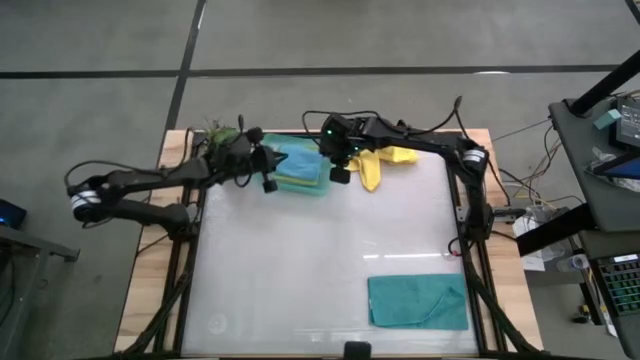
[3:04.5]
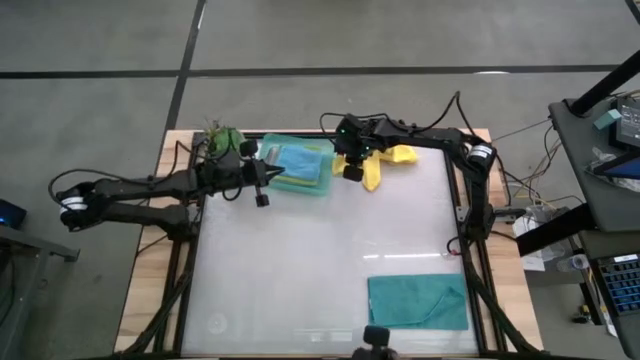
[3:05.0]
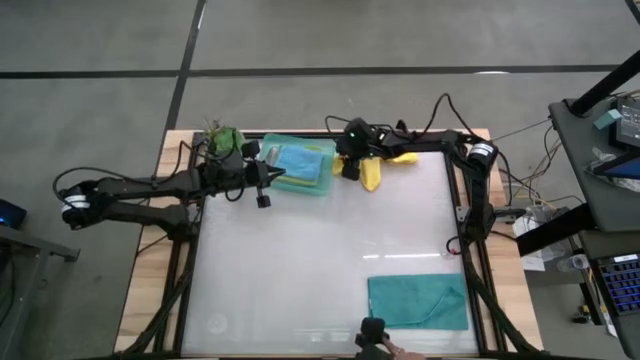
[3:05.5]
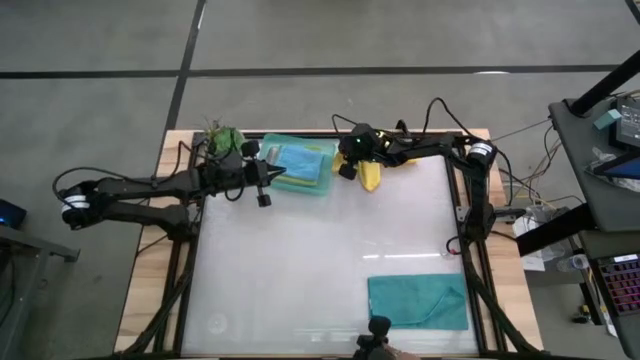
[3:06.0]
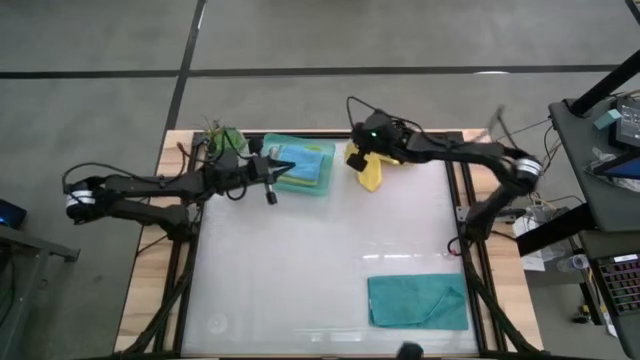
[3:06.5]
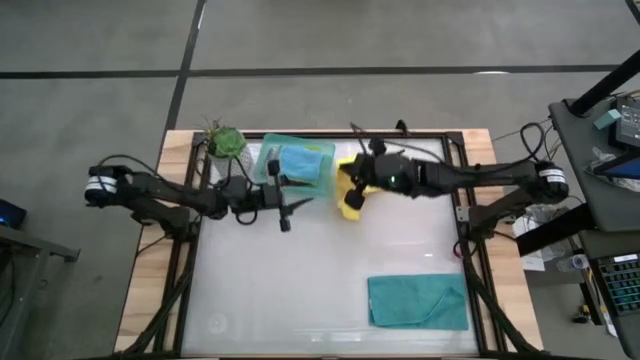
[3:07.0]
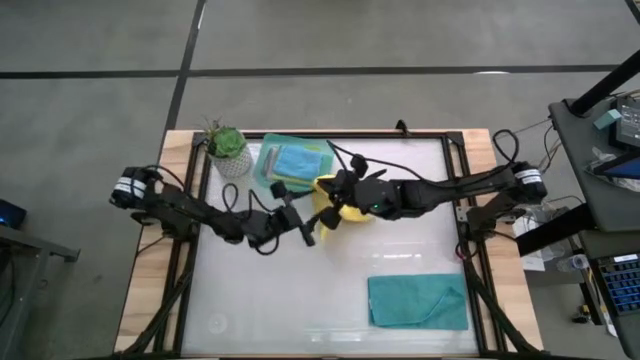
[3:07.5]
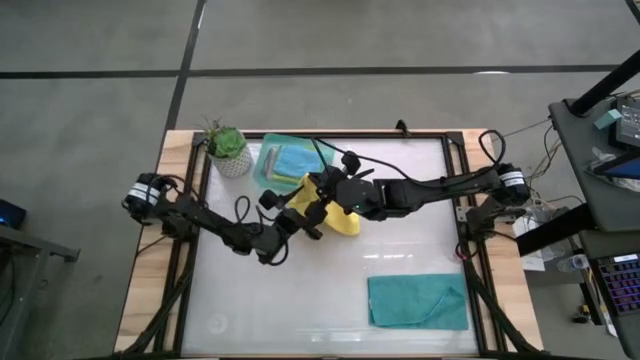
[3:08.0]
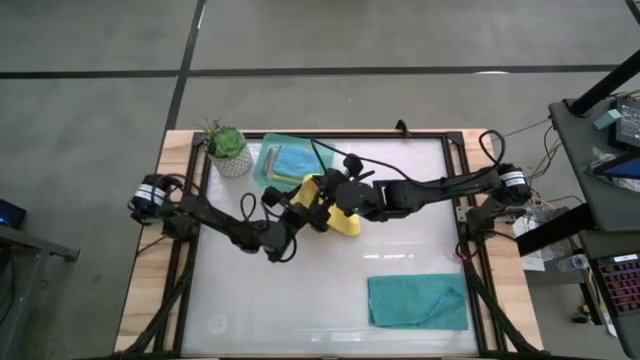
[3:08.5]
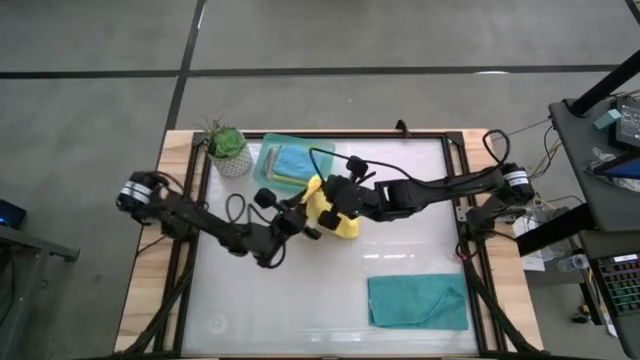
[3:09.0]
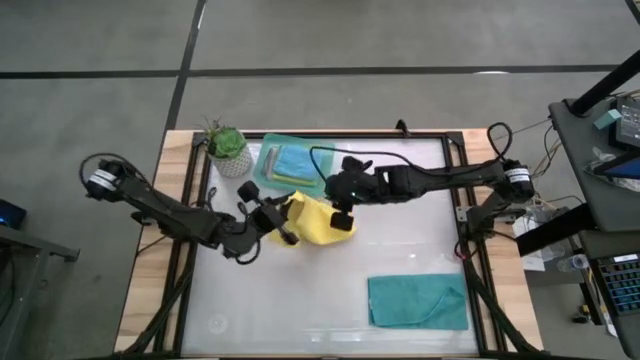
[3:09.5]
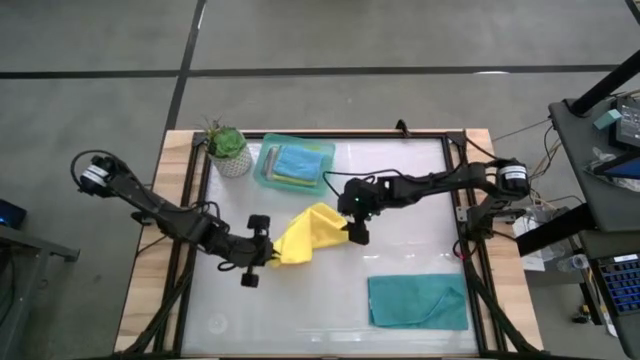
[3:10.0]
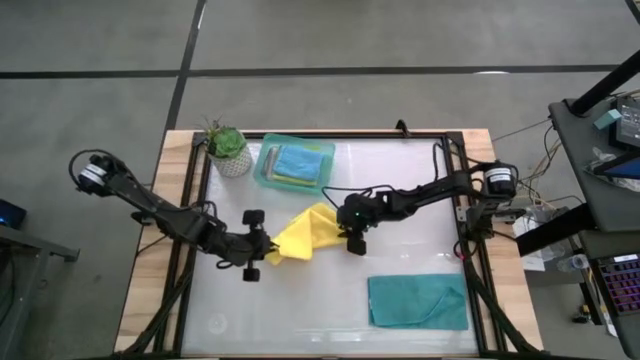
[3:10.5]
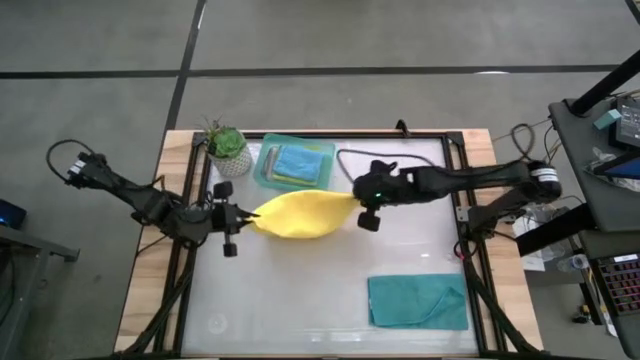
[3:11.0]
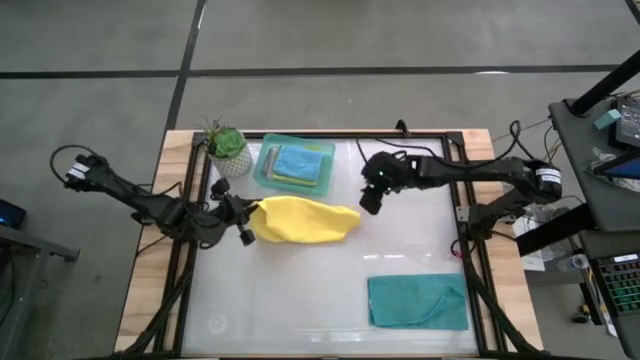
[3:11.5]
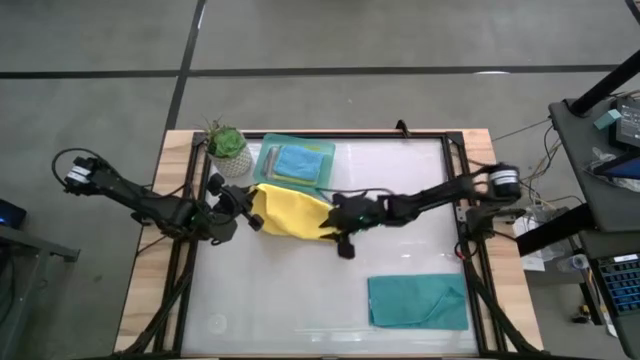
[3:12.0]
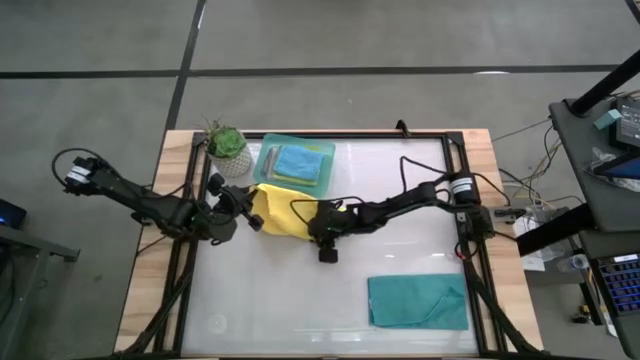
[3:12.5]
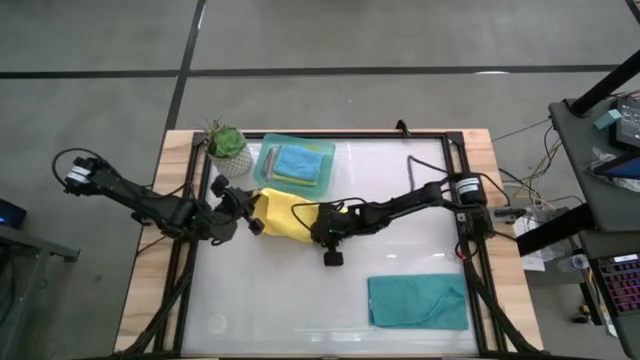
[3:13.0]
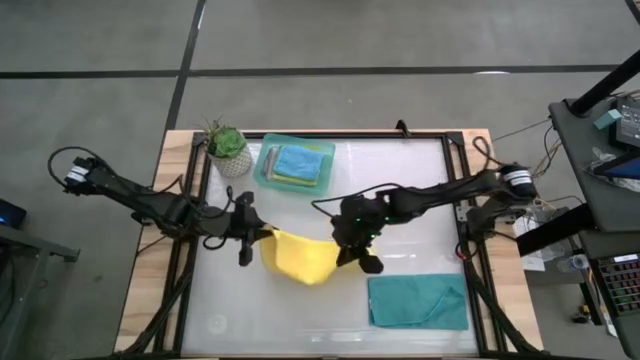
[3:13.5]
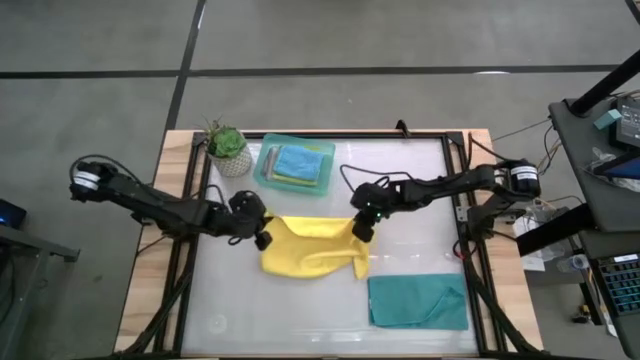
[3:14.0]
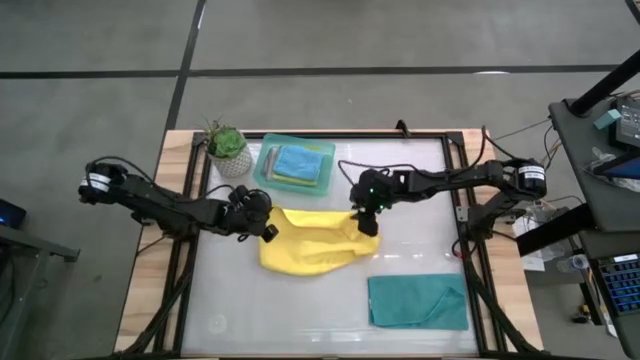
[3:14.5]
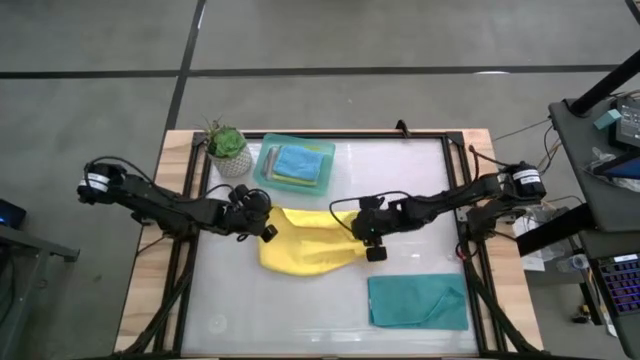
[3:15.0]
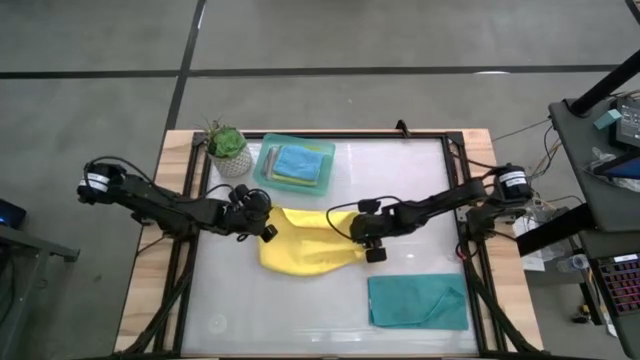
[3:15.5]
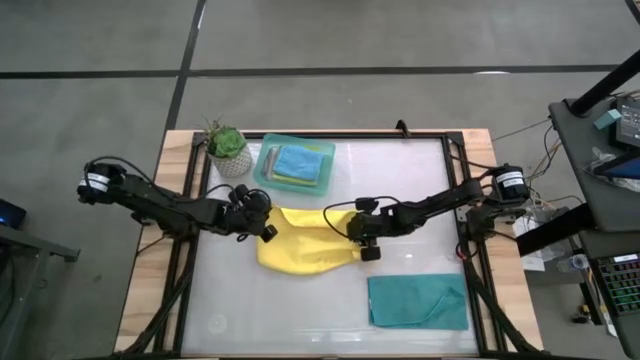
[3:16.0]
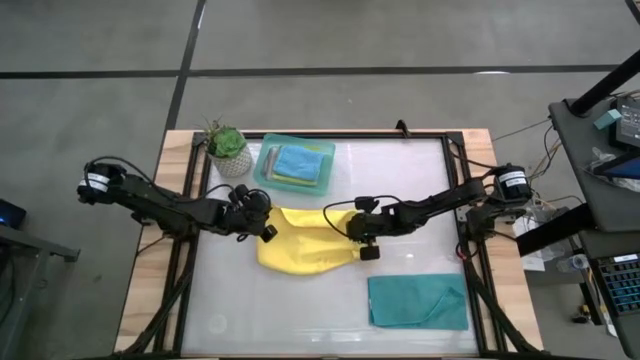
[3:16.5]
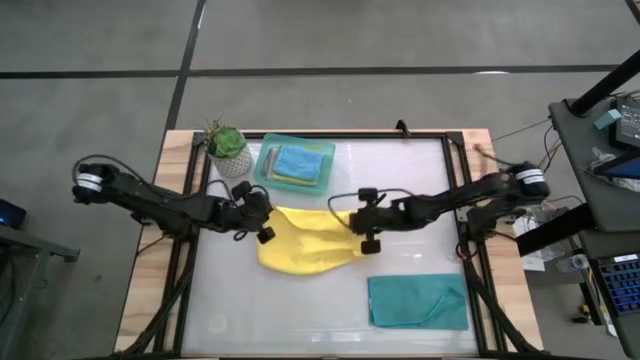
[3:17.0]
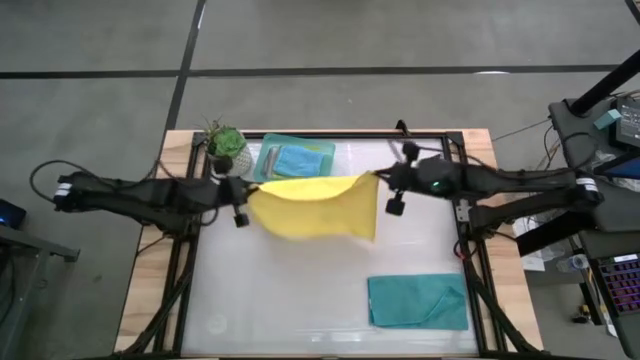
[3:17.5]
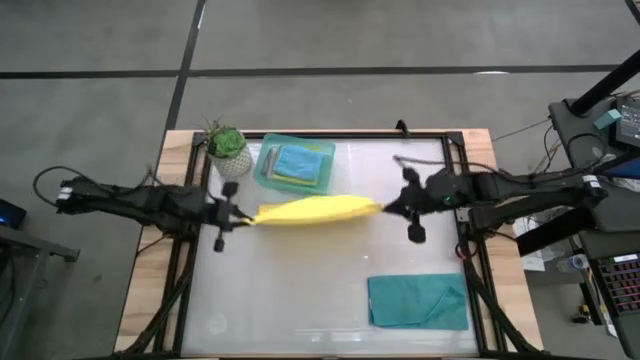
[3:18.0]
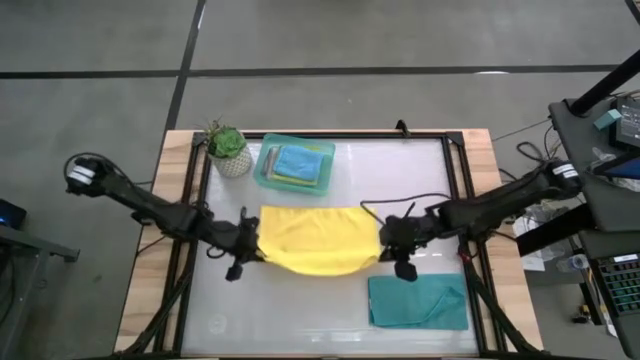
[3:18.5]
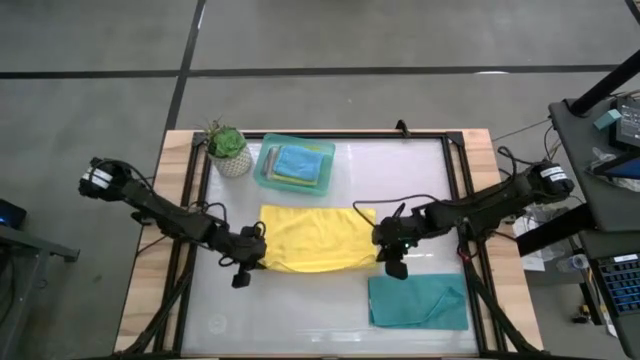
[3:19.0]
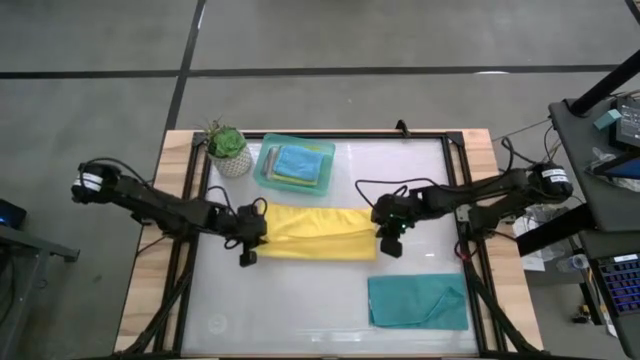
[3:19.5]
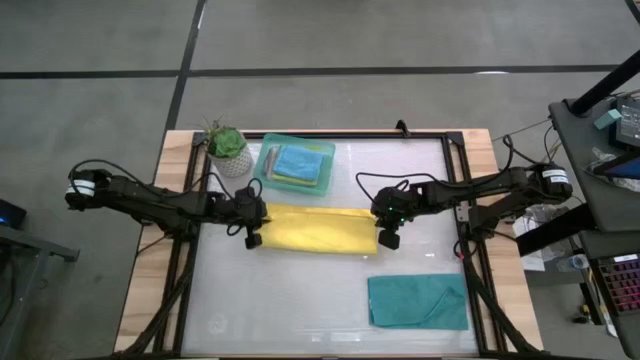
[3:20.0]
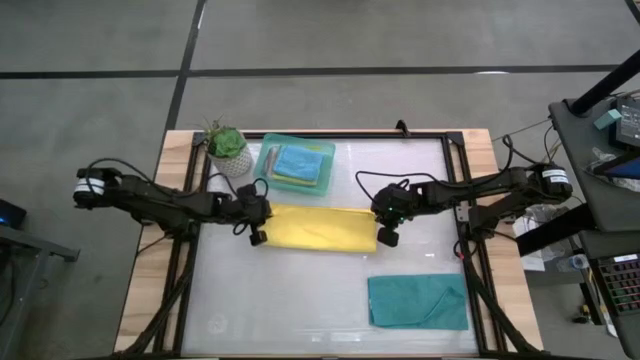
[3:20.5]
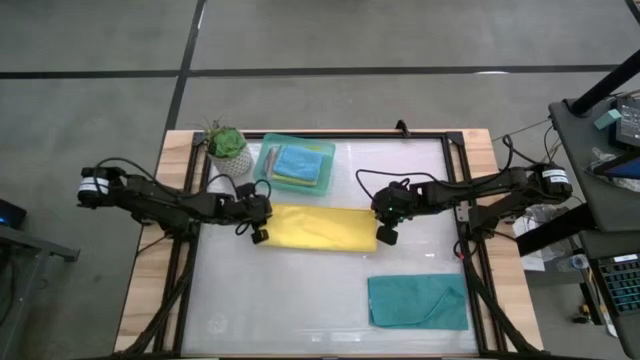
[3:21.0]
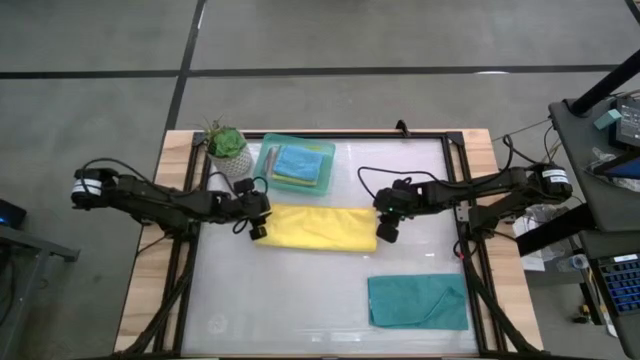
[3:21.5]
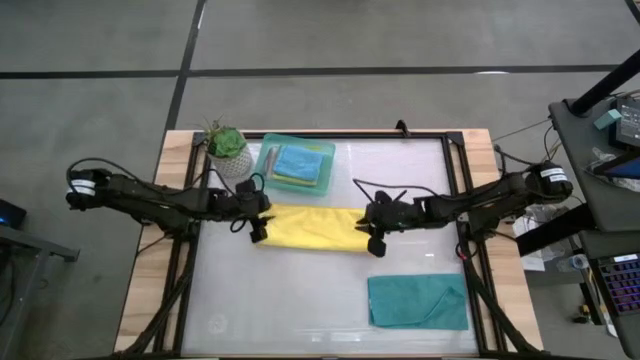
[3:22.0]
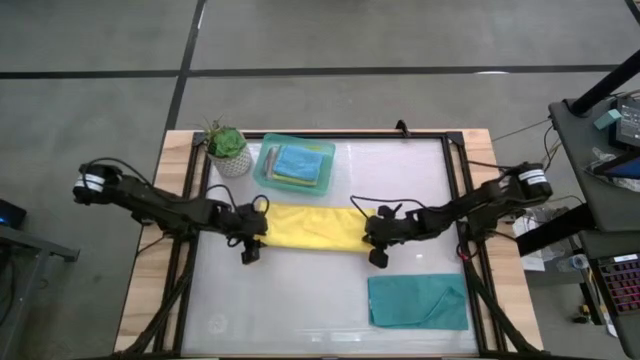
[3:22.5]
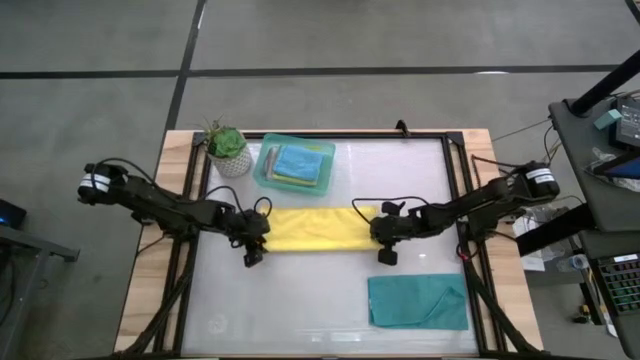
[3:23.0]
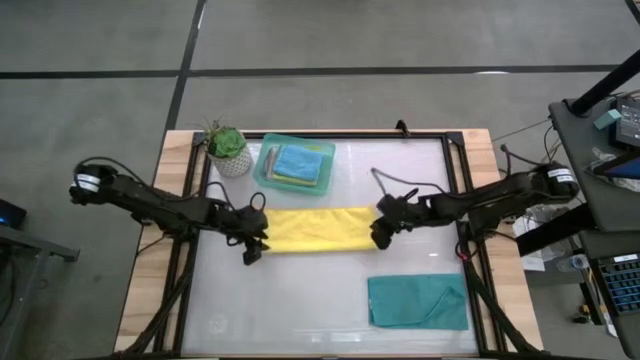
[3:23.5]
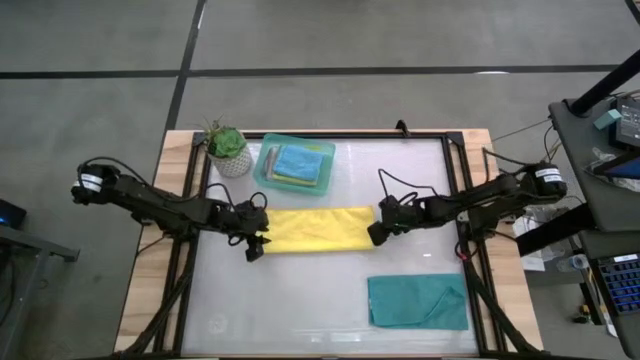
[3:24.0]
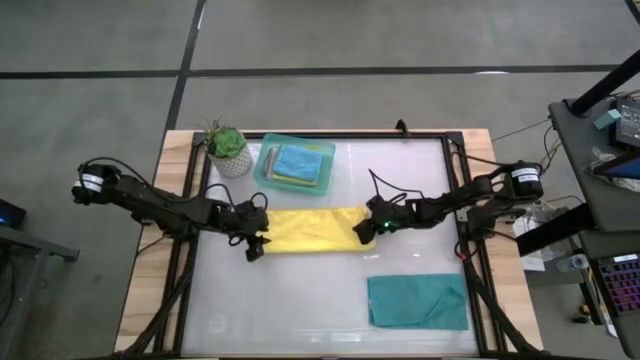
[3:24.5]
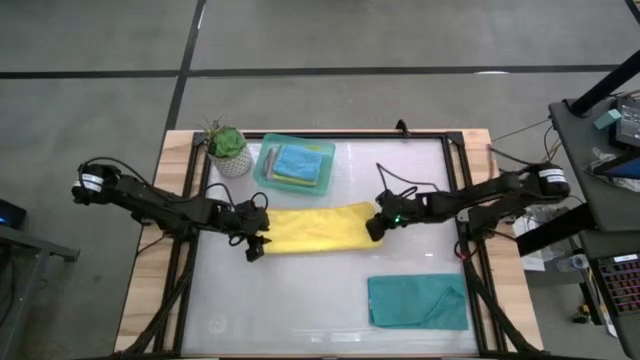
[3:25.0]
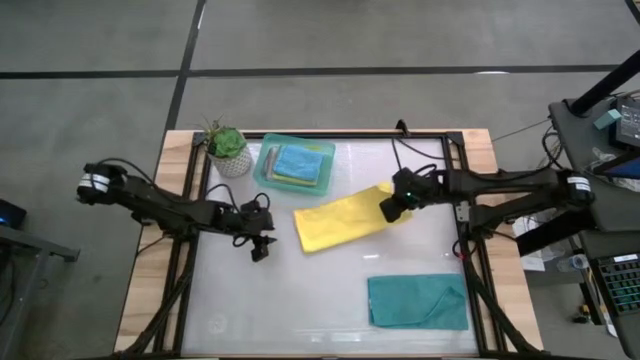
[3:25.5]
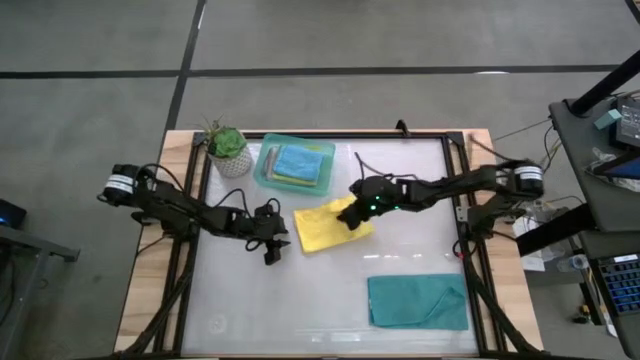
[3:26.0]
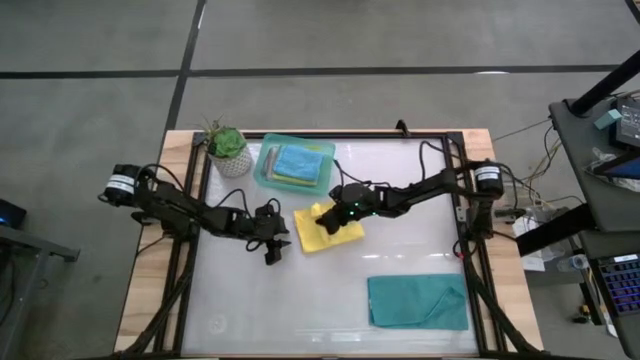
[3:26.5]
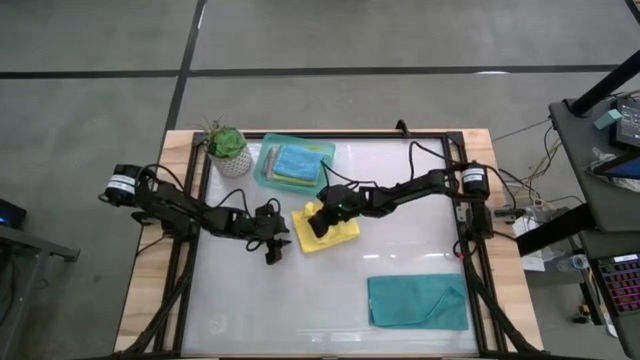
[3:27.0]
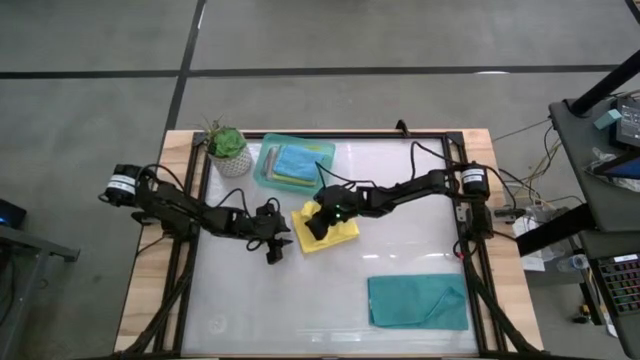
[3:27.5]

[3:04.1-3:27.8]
Task: Fold microfiber towels
Fold the yellow microfiber towel
